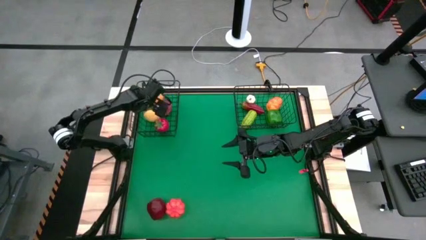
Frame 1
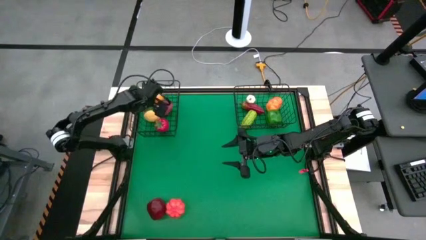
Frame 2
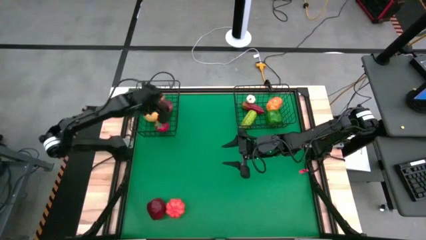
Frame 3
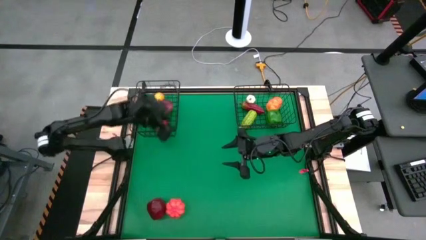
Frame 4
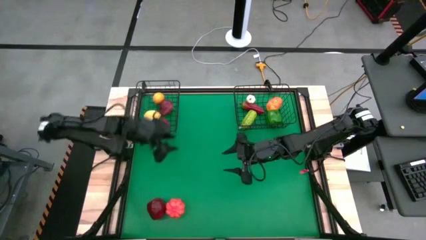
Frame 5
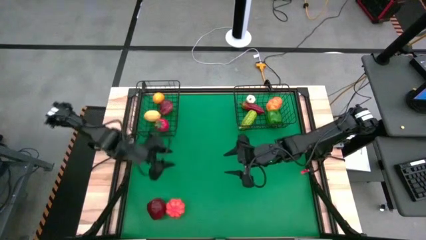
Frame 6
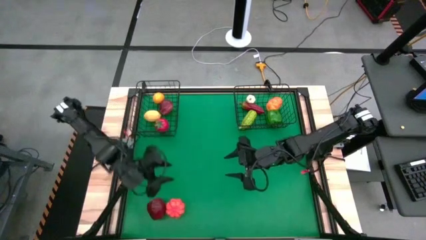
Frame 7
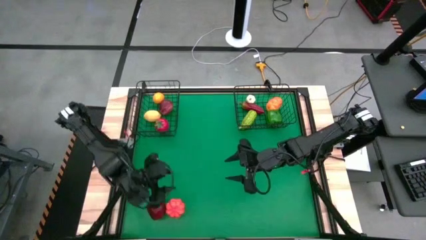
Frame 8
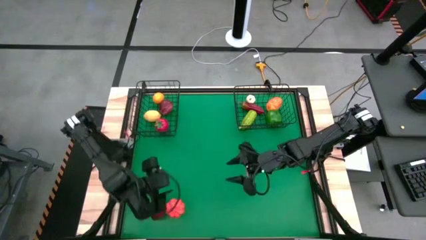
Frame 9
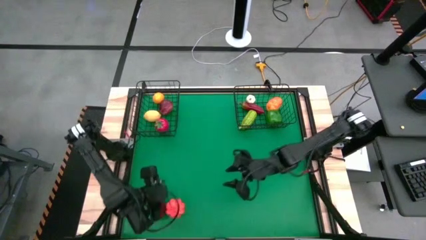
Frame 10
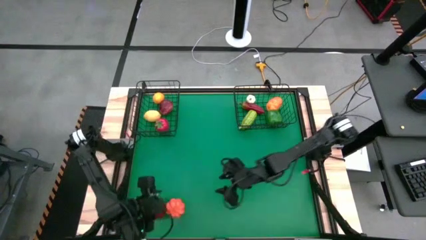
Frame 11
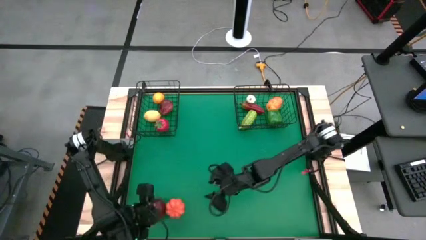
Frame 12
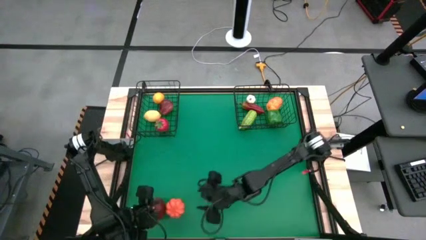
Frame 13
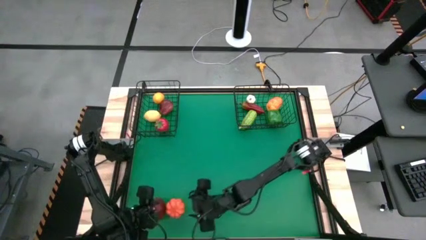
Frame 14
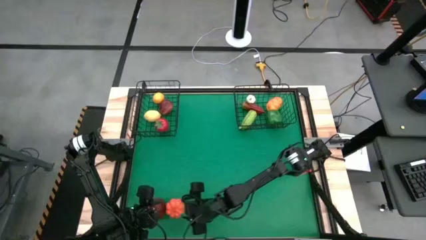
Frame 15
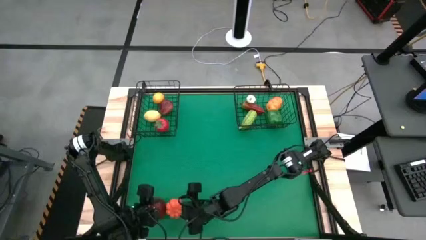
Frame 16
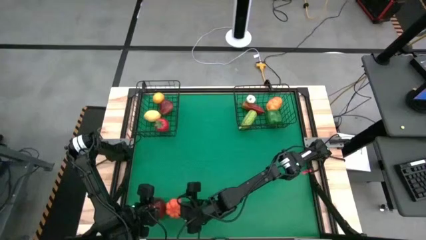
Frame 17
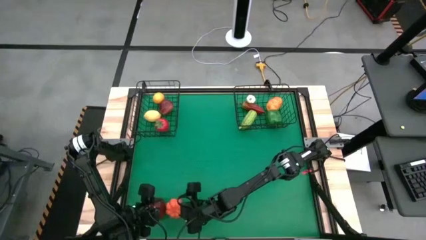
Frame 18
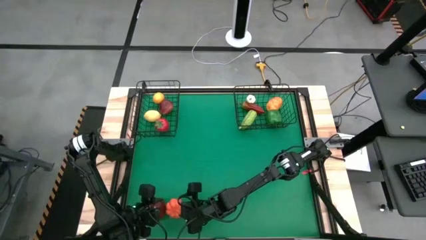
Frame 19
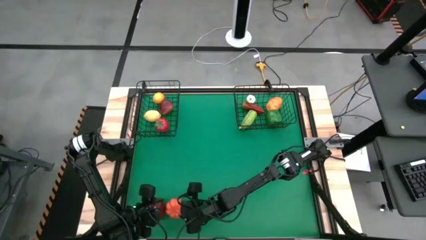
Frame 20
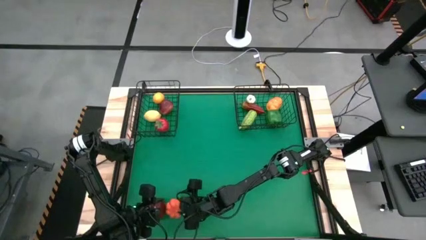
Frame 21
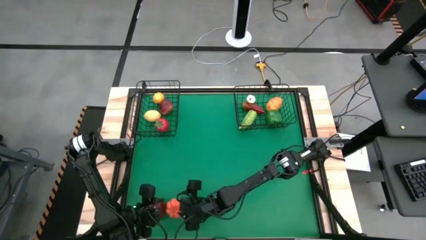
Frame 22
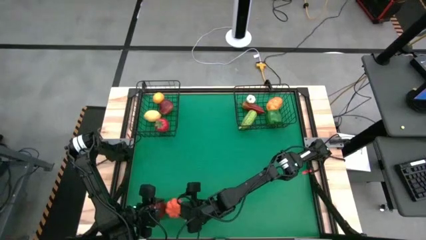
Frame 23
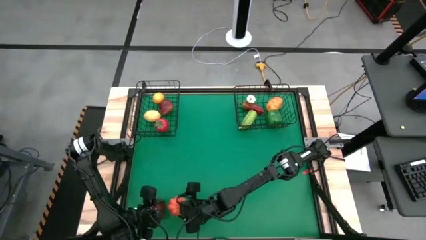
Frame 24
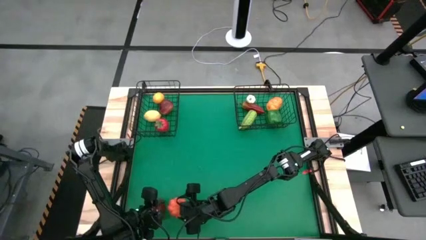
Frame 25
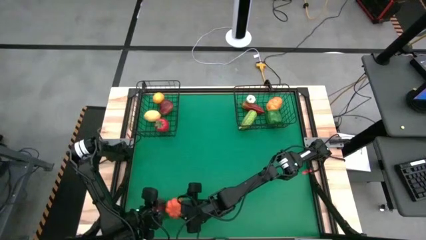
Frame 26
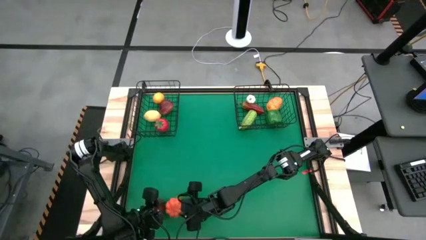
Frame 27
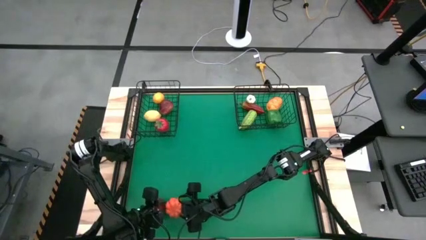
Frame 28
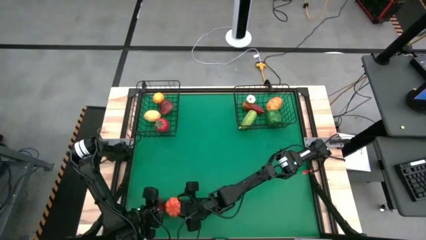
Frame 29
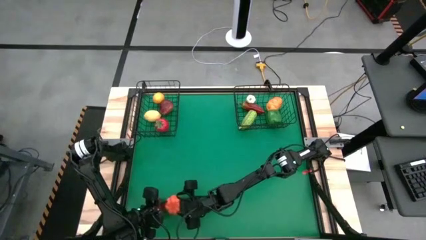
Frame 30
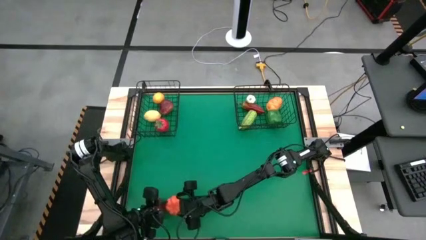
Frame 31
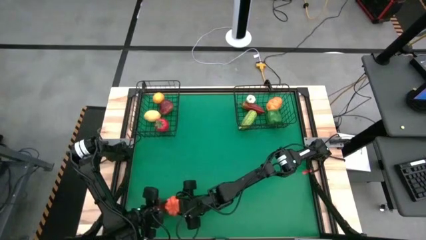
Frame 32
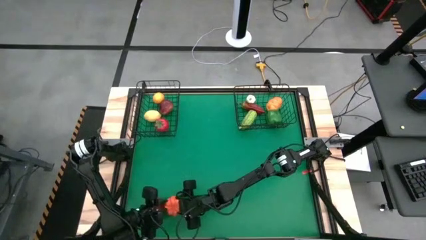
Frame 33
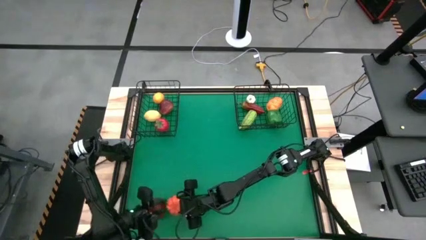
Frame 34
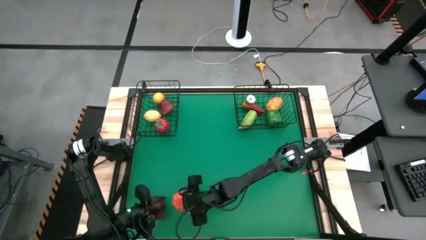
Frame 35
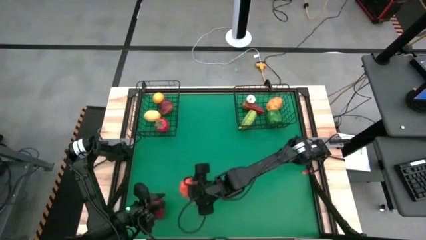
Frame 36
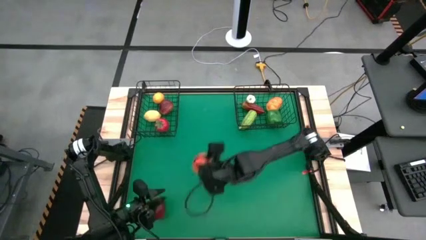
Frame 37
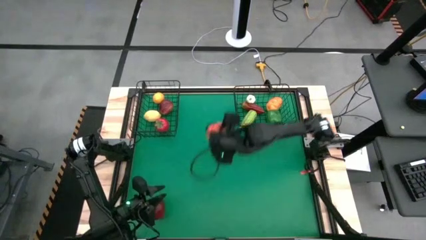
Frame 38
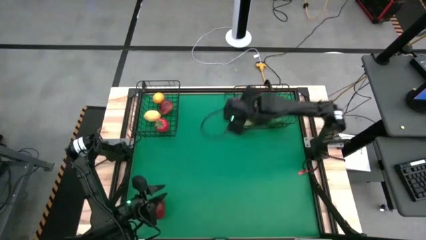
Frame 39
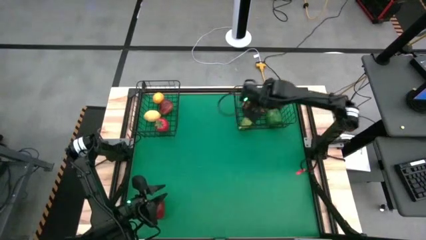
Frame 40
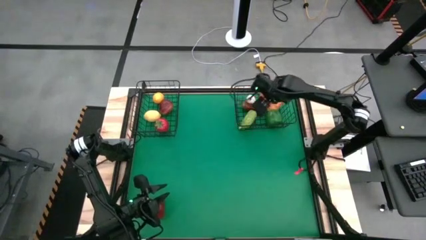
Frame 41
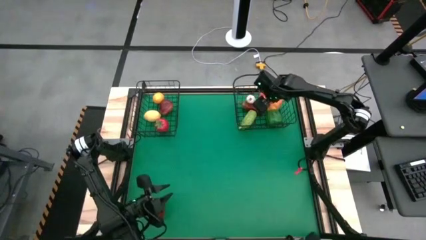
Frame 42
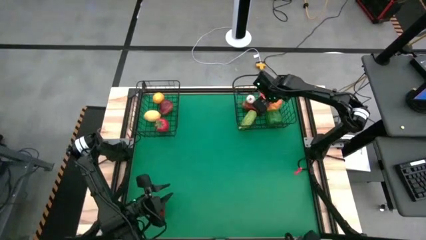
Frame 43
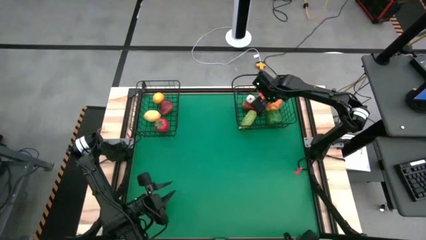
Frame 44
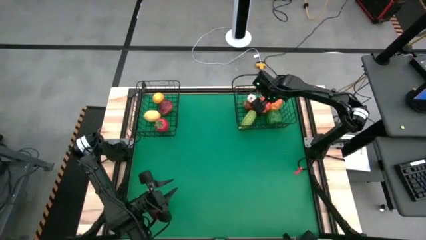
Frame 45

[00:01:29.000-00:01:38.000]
Task: Sort produce into baskets
Put the orange pumpkin into the right wire basket

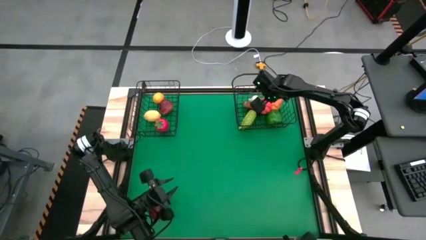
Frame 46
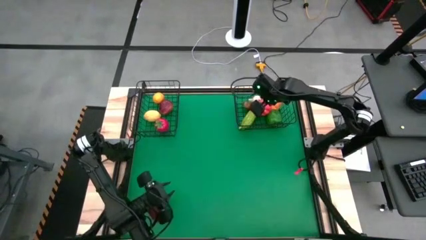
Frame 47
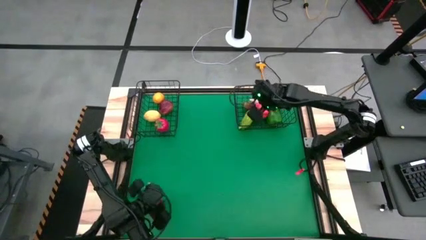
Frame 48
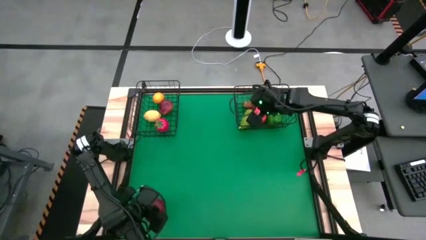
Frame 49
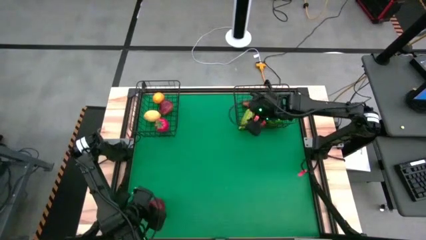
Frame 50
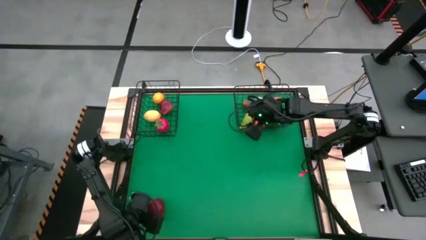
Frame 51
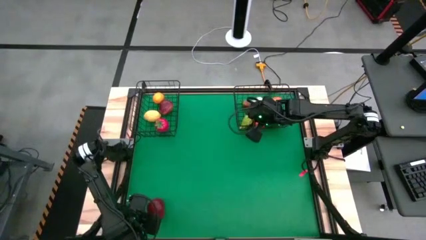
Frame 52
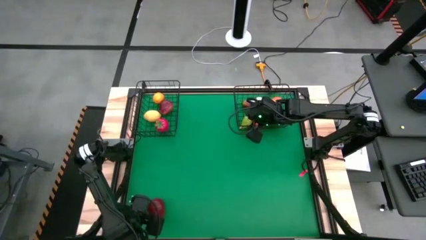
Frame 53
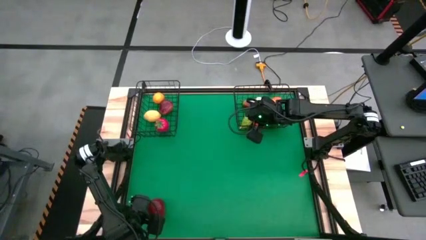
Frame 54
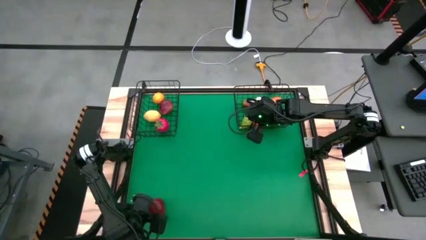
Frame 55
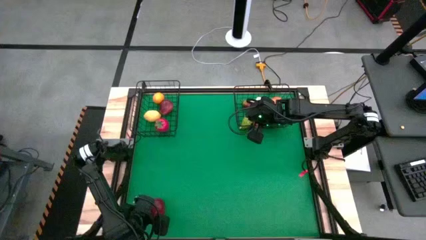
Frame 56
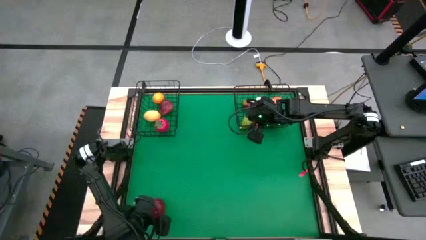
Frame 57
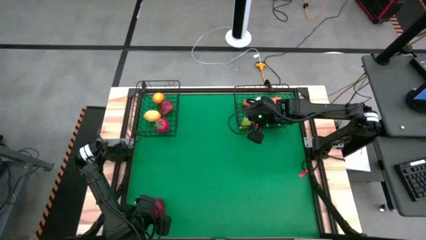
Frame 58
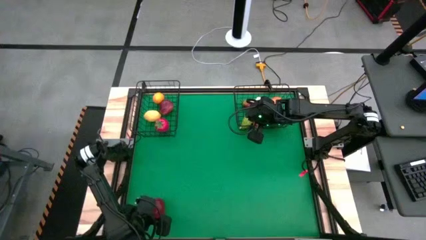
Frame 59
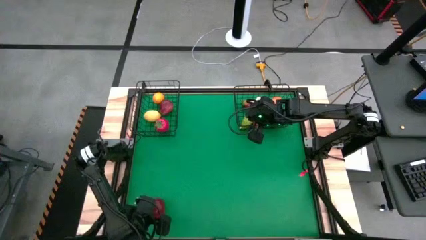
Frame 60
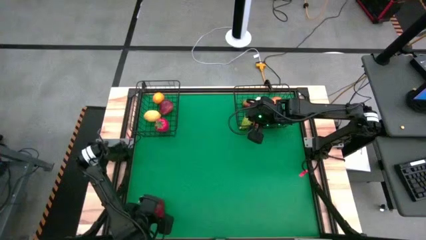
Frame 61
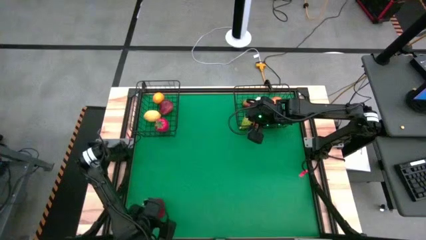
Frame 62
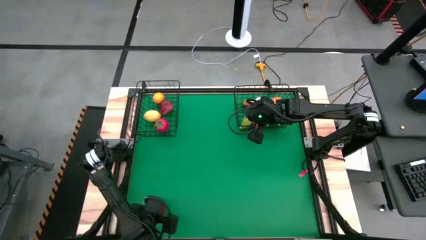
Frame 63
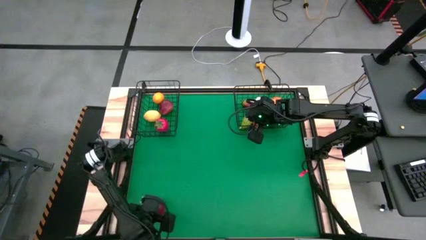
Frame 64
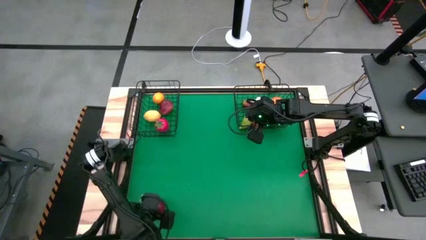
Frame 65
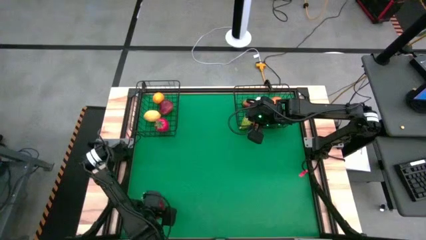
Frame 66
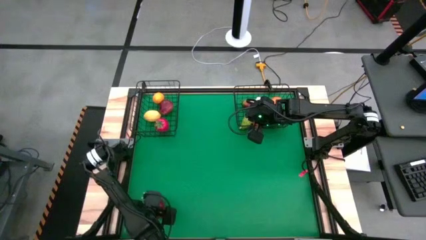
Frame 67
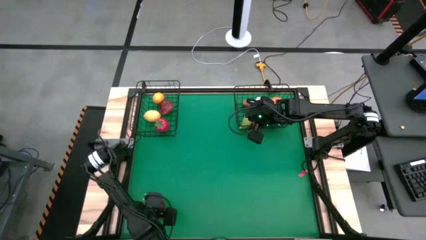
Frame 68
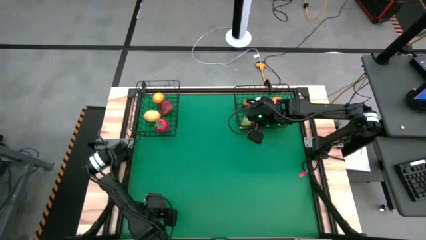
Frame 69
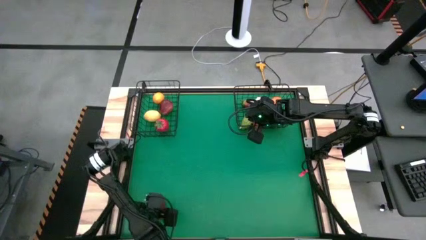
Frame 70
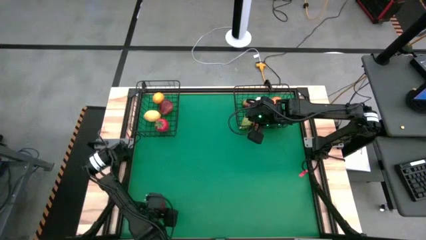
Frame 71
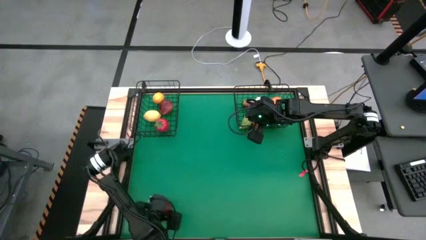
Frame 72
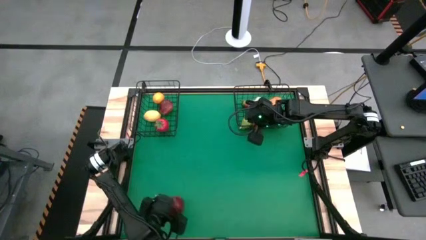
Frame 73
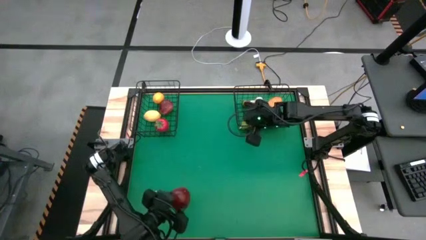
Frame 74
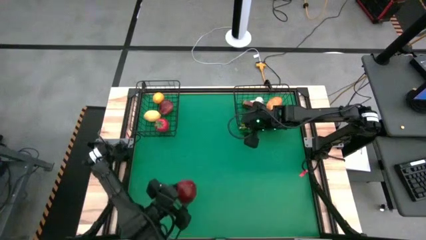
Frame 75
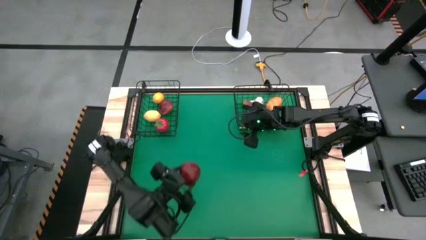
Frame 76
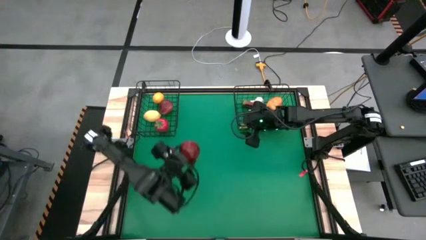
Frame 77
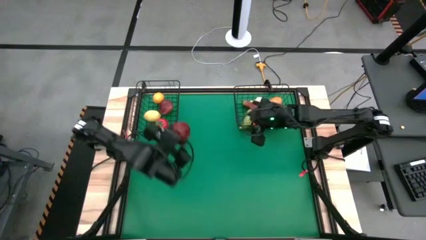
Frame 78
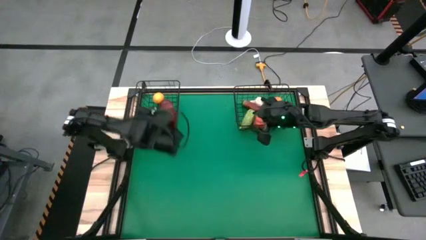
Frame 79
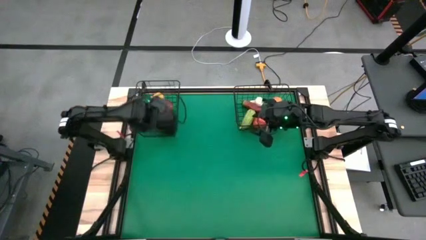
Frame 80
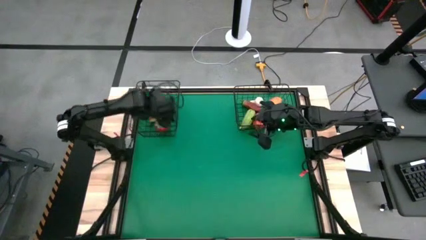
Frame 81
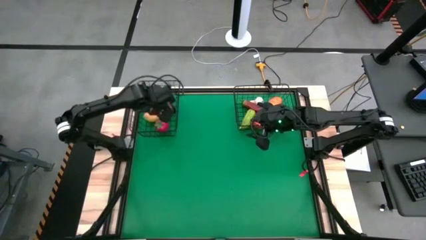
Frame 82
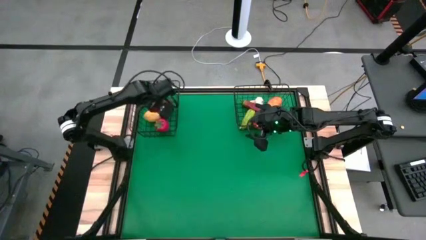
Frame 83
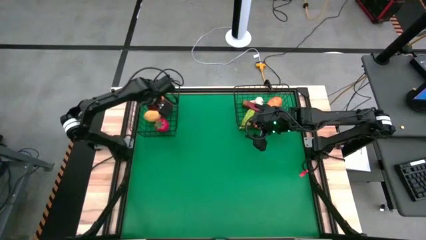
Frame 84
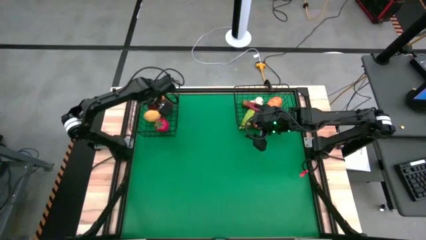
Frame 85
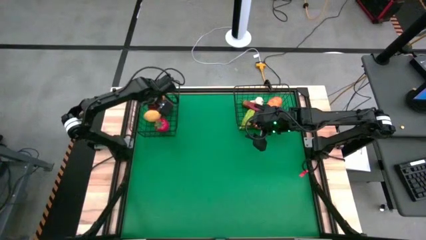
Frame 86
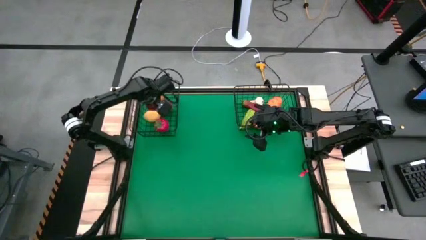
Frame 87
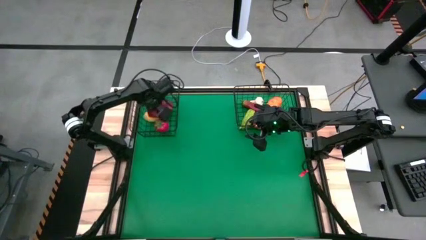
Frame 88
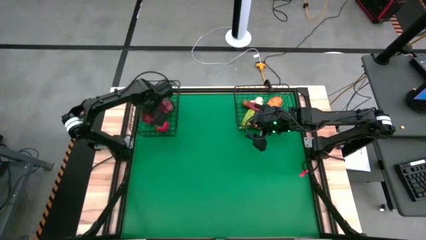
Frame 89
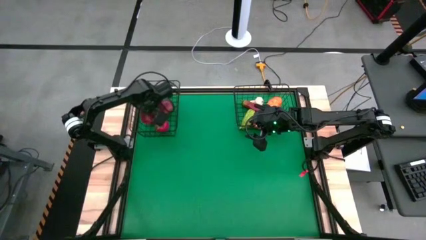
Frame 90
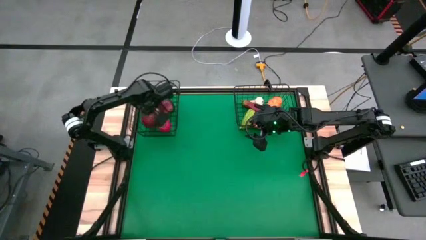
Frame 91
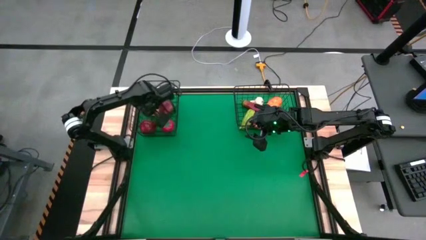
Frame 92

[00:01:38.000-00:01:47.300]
Put the red apple into the left wire basket
